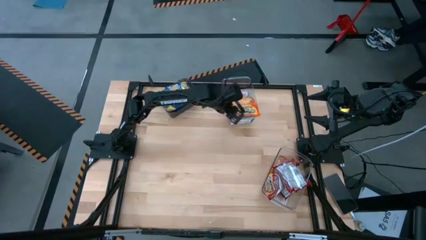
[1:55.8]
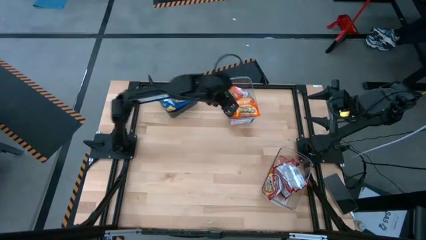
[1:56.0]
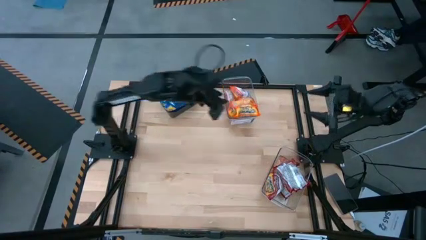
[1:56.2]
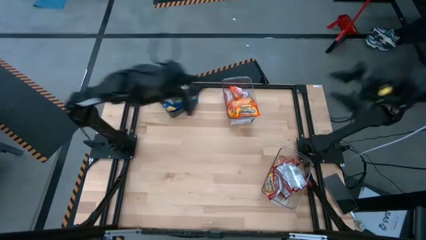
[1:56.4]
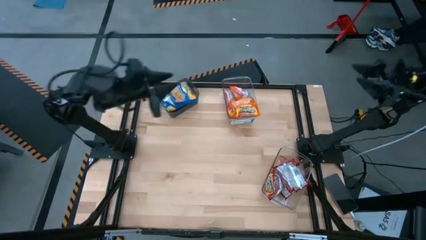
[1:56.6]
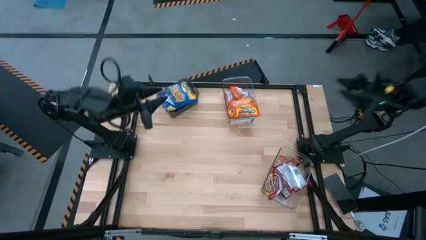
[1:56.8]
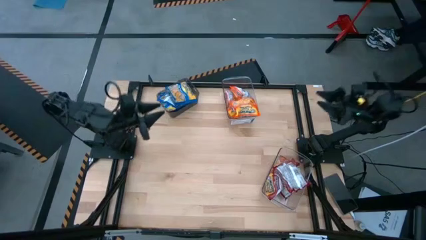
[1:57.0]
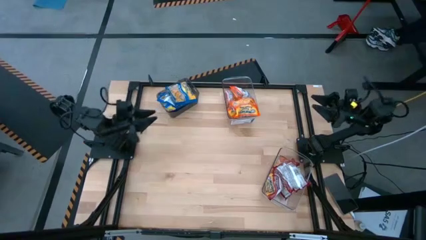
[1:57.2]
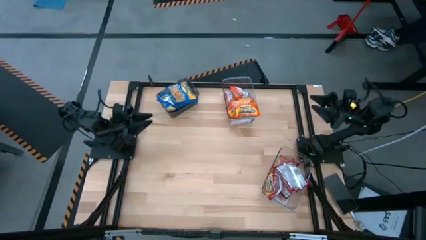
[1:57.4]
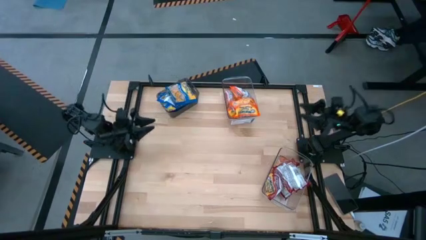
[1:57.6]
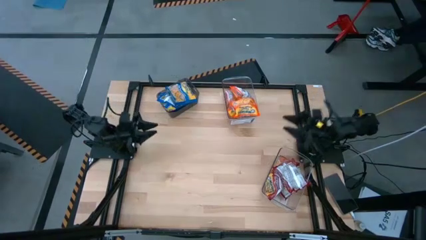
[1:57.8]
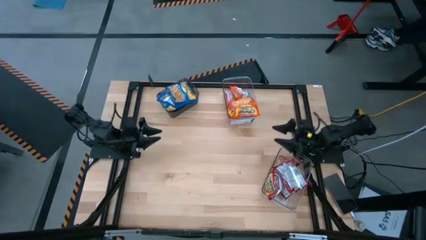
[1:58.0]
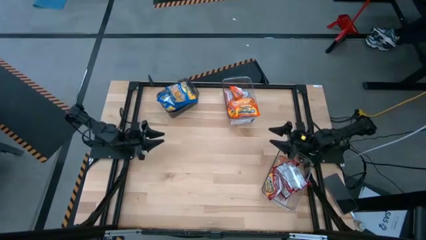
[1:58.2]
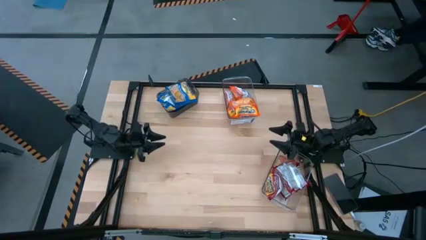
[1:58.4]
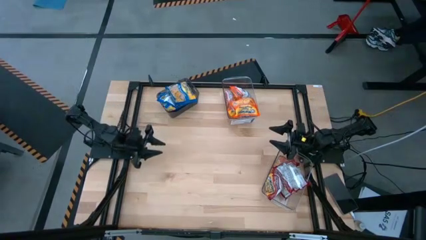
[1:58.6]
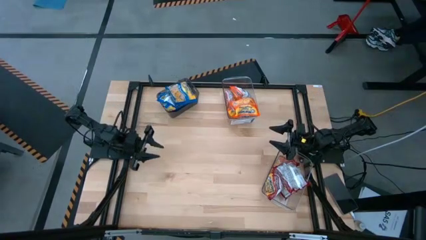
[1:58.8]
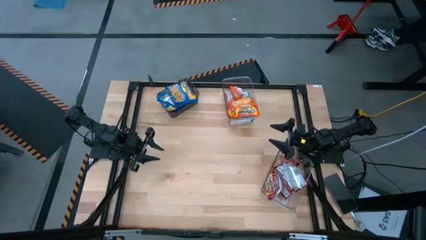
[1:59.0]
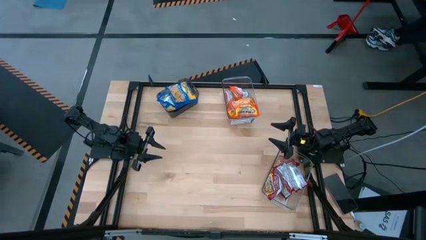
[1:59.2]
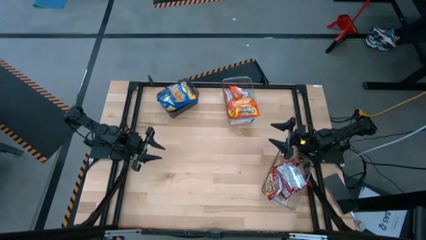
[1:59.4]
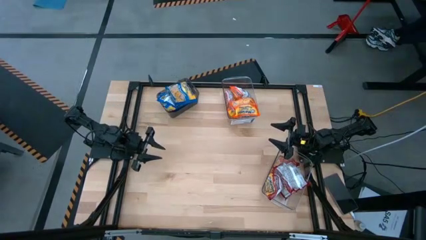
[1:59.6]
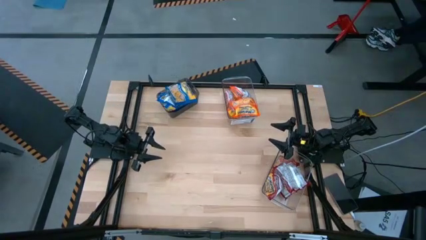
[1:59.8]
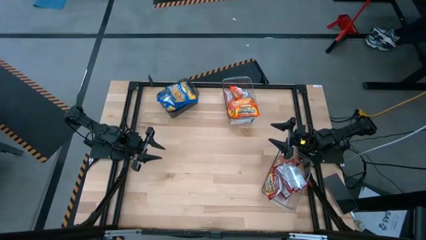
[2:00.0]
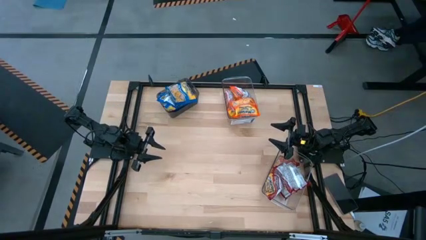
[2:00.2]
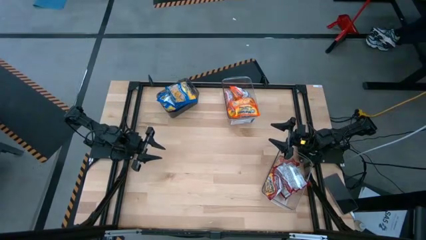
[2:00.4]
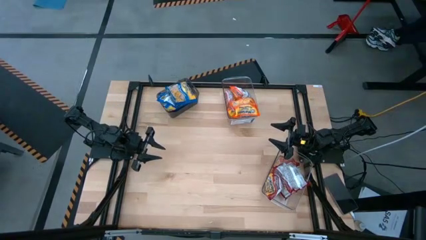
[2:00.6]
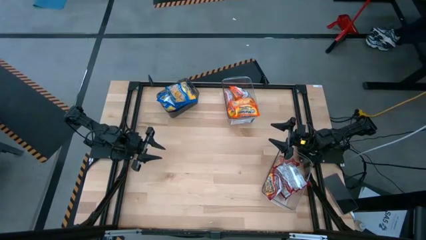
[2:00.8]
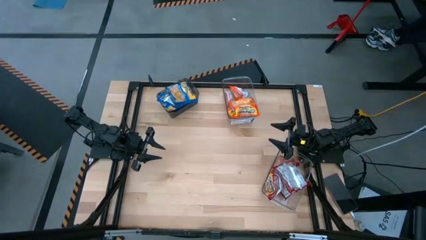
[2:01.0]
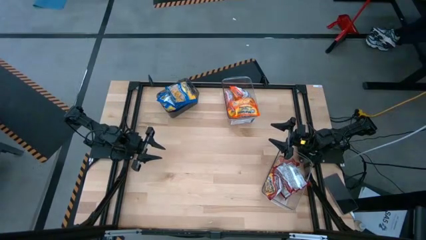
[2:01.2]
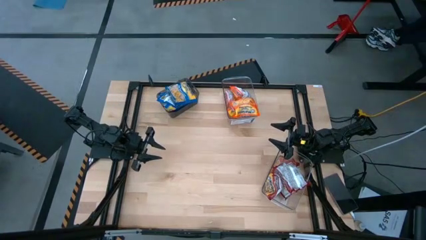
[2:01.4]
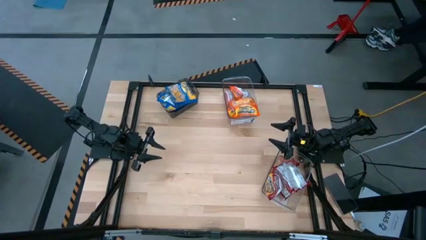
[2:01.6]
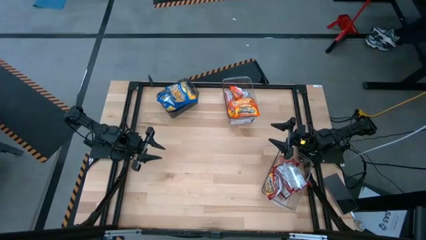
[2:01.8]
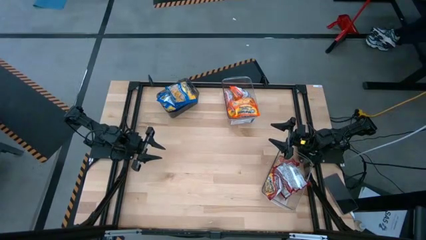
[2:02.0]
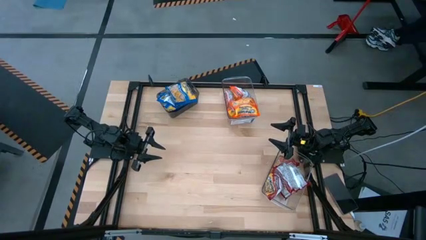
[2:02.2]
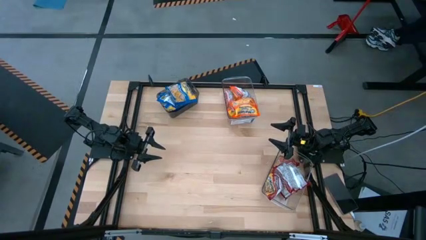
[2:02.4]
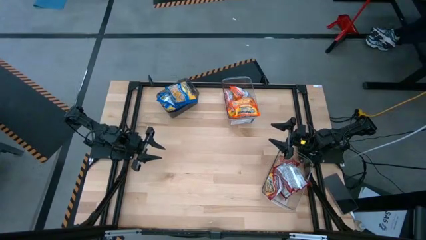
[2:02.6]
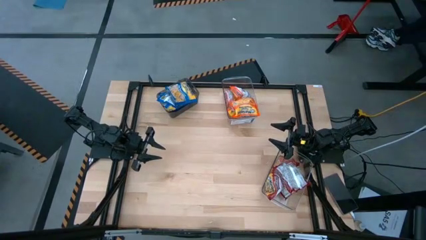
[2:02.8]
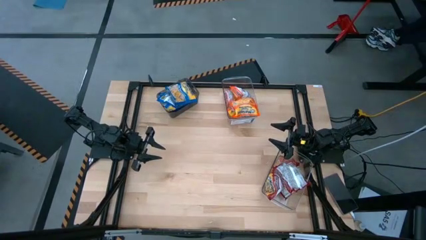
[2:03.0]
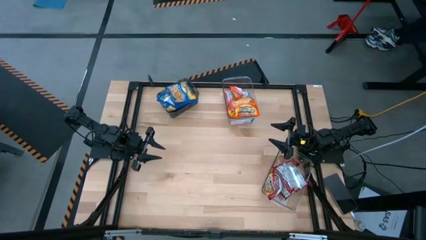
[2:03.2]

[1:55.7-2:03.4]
Task: Sort Maruchan noodles
Return to Home Position

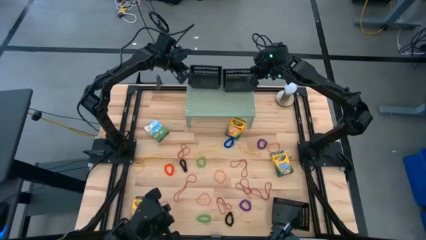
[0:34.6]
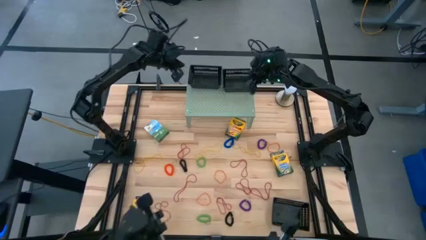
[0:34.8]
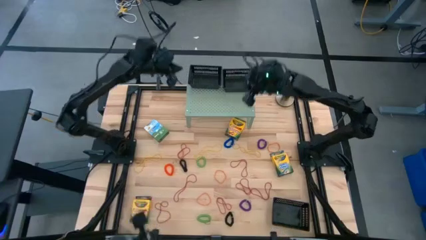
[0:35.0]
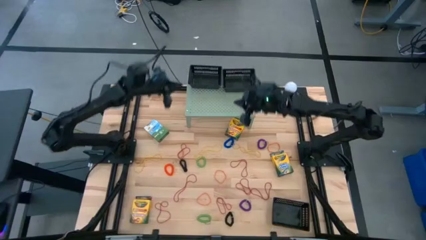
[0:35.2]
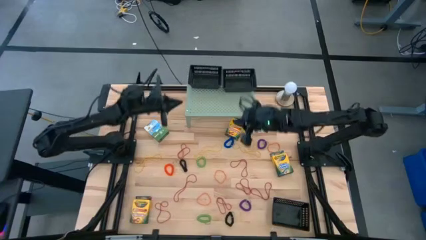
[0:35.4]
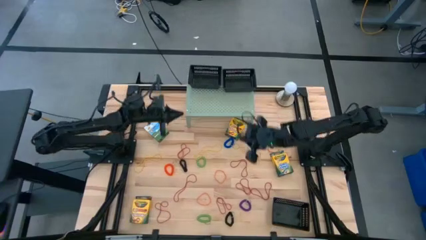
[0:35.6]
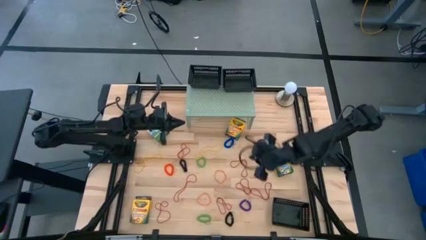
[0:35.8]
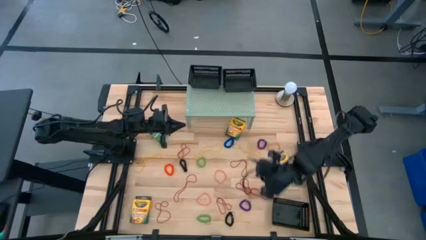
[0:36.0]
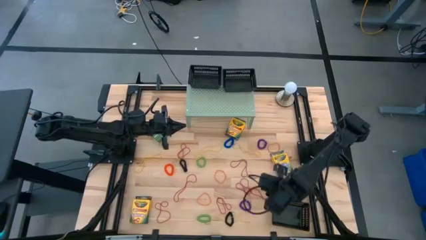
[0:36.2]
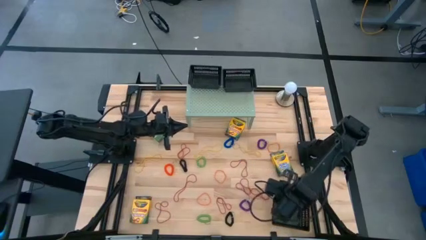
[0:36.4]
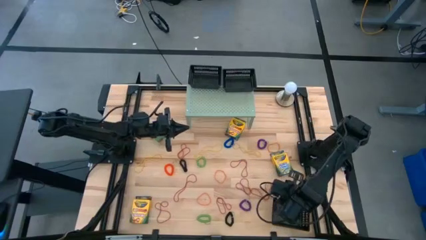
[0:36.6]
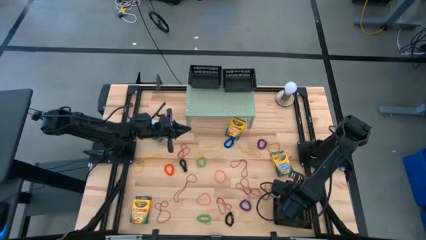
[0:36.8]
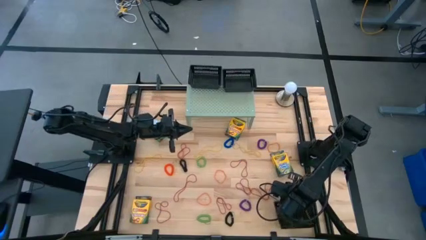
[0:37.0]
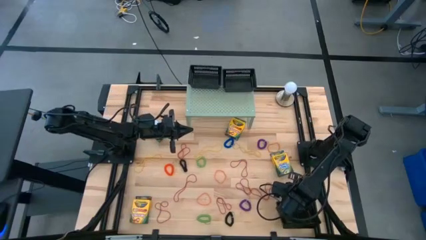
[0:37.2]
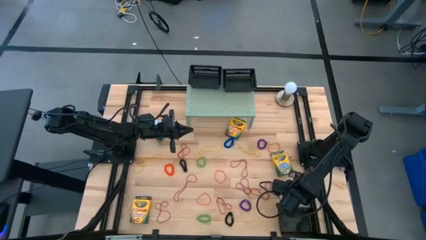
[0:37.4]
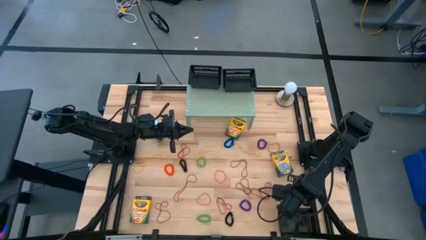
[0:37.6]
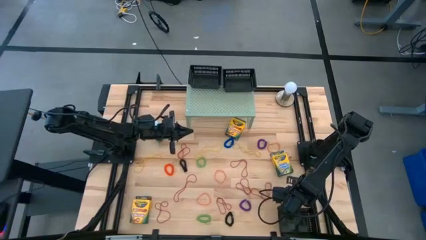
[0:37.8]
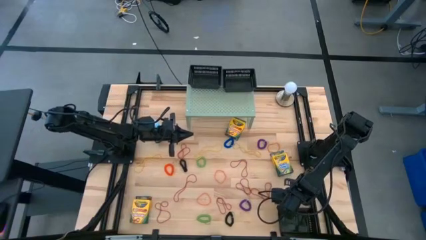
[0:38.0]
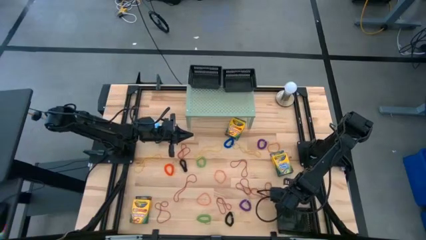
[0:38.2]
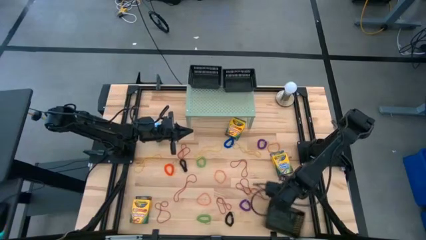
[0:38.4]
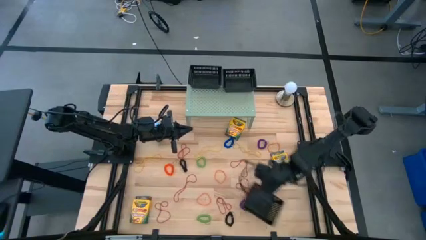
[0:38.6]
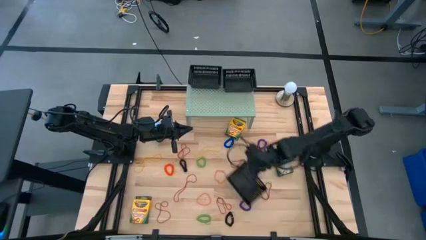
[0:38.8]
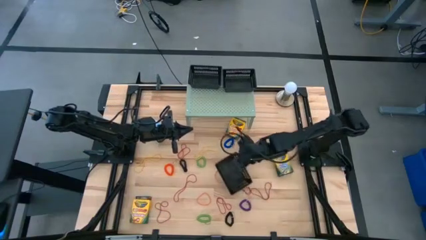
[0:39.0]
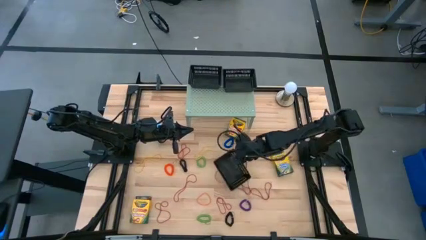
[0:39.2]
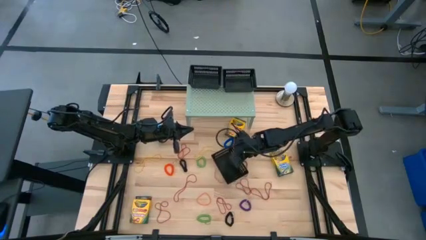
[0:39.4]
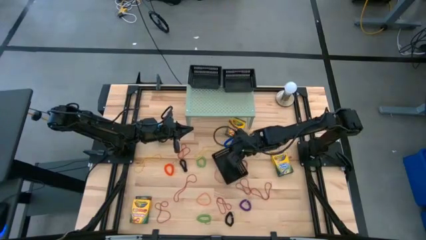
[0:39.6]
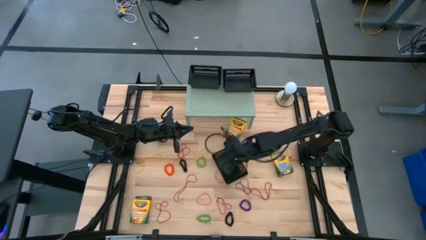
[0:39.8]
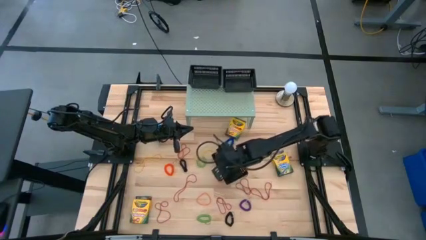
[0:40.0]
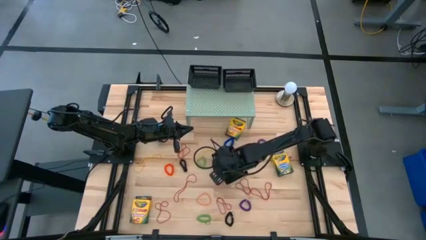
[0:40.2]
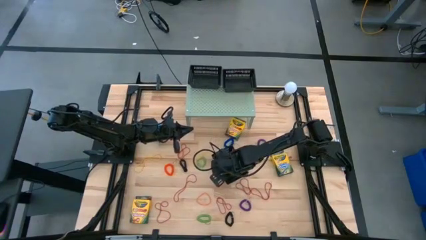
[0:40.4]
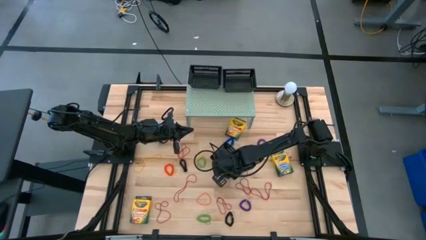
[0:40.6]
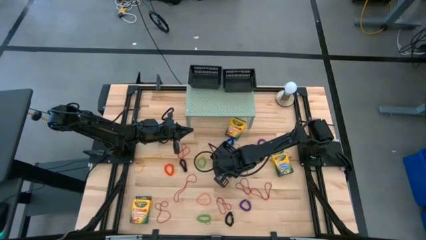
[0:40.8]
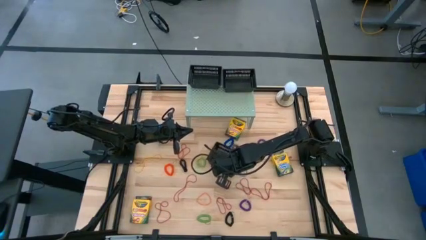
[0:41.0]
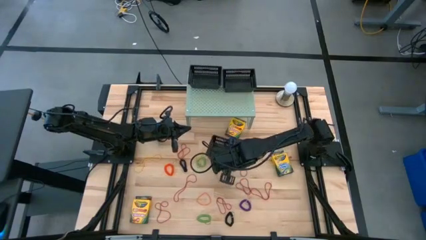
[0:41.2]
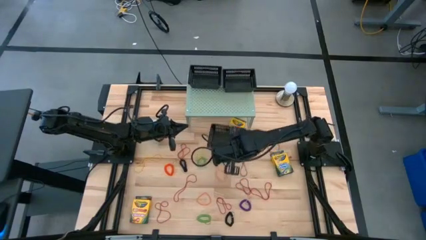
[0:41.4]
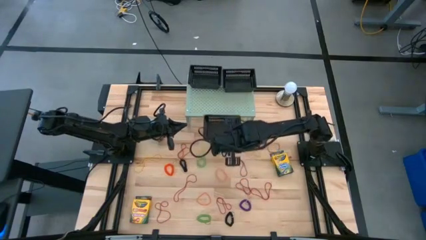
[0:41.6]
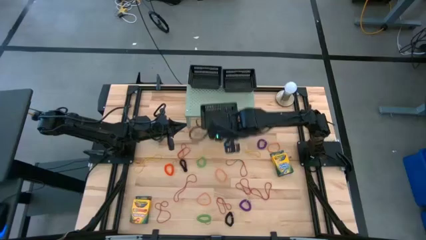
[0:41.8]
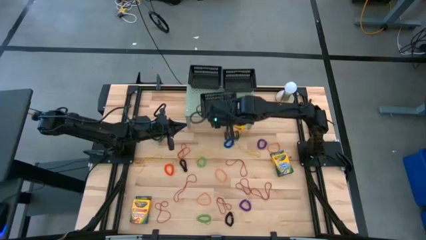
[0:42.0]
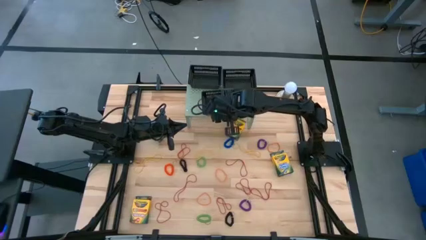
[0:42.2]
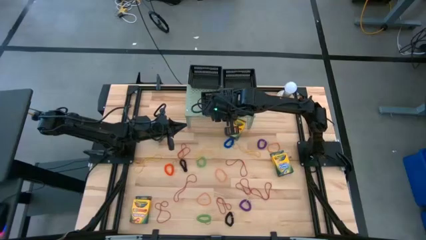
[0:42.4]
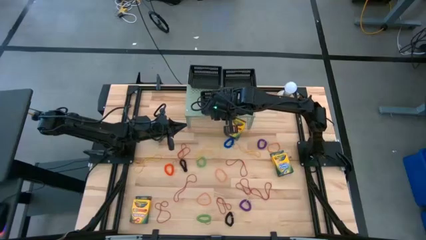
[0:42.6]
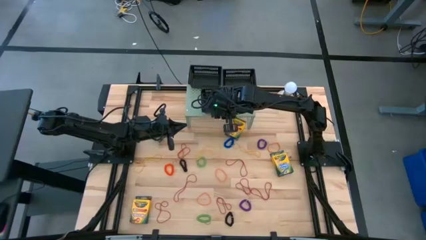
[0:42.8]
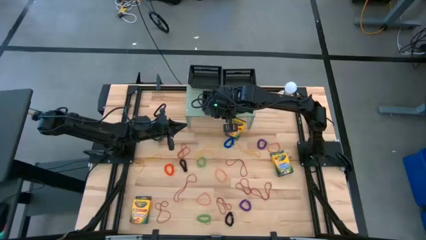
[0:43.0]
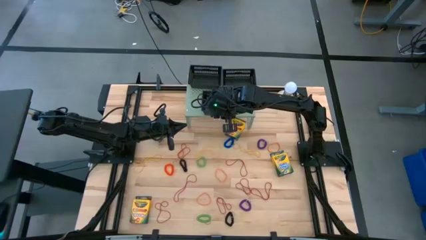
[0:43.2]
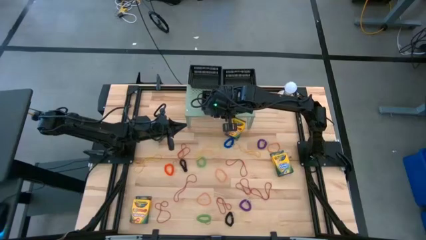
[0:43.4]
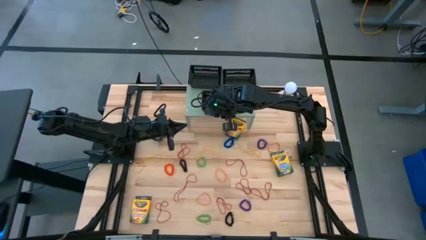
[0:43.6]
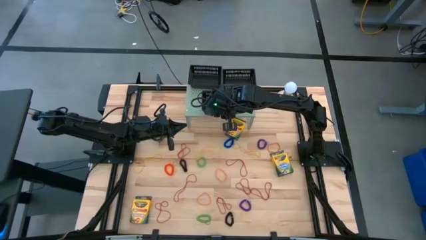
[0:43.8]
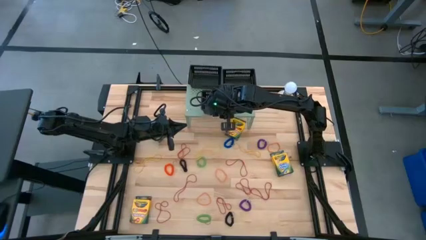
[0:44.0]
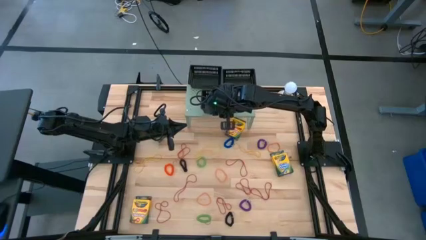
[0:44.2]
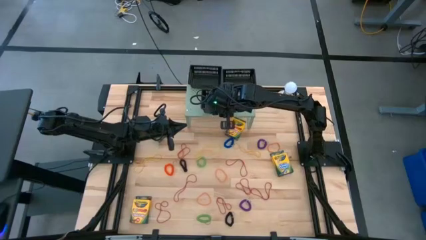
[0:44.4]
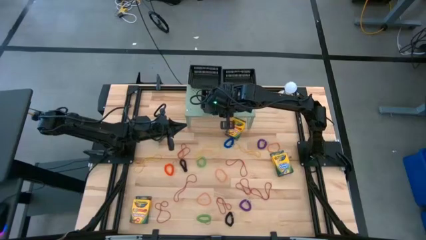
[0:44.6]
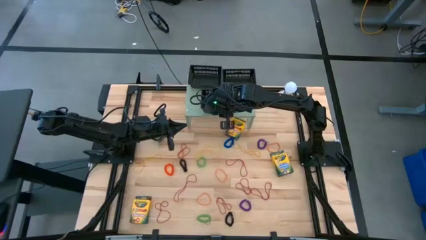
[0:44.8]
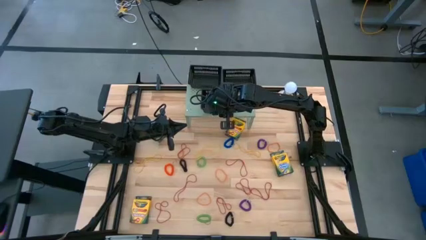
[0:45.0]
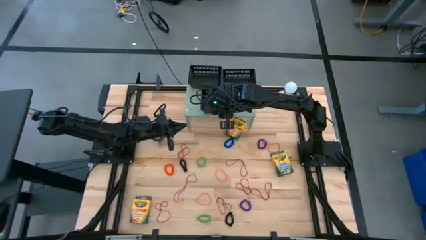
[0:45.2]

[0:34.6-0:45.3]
Task: Pick & Place Office Desk Supplies
Put the black bin on the shelf
